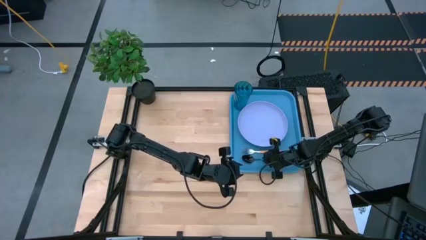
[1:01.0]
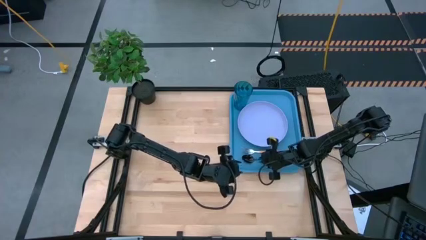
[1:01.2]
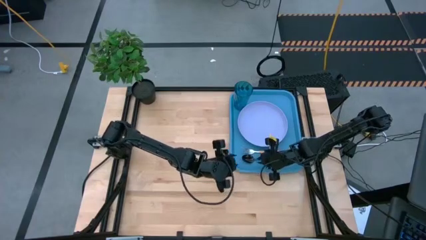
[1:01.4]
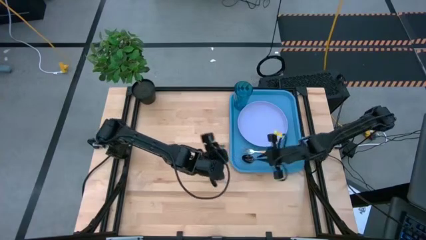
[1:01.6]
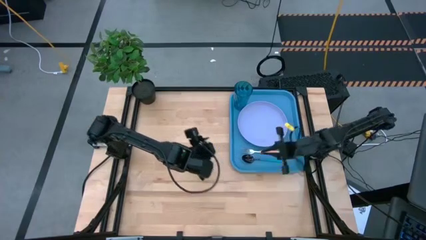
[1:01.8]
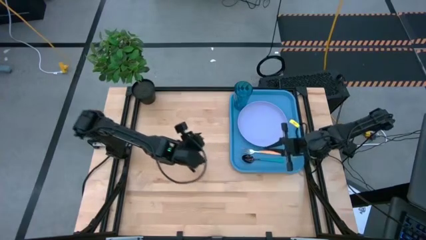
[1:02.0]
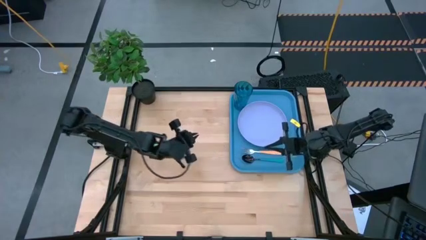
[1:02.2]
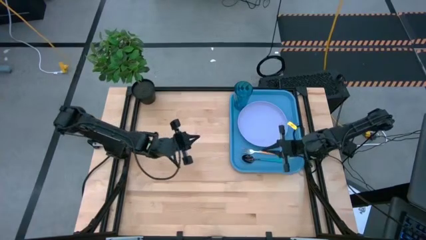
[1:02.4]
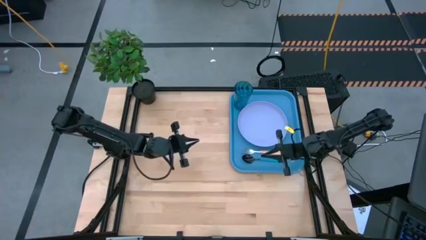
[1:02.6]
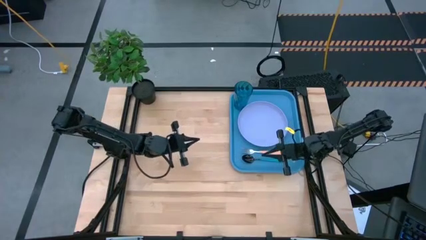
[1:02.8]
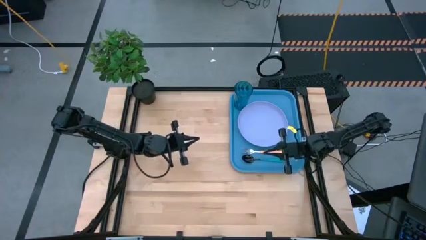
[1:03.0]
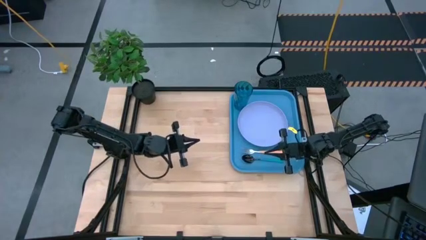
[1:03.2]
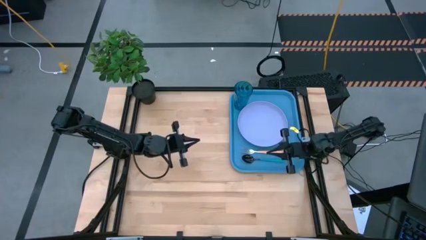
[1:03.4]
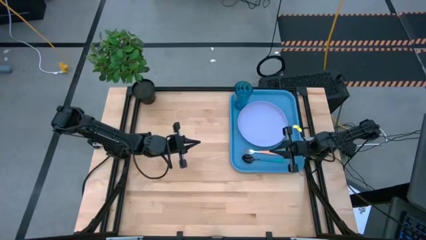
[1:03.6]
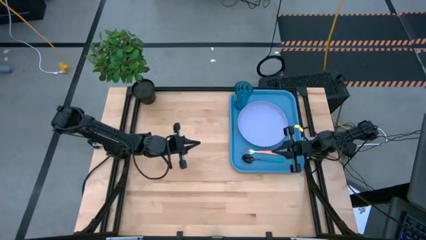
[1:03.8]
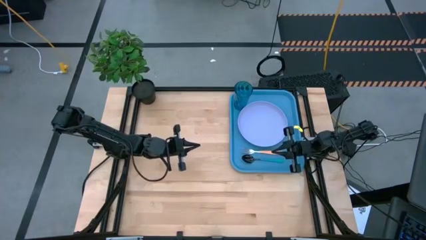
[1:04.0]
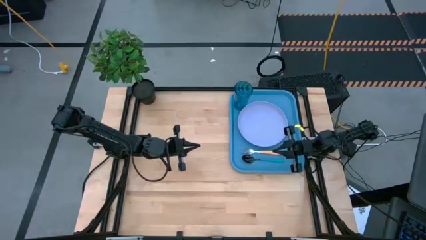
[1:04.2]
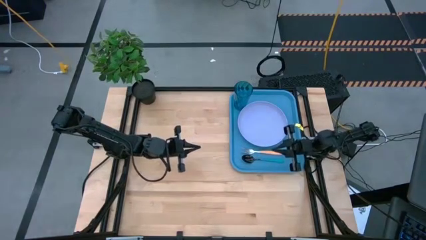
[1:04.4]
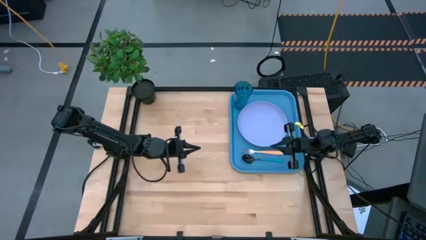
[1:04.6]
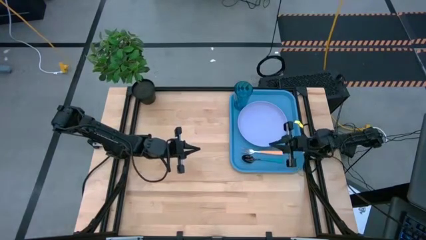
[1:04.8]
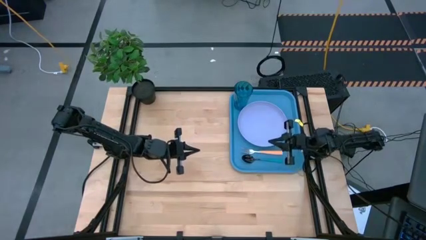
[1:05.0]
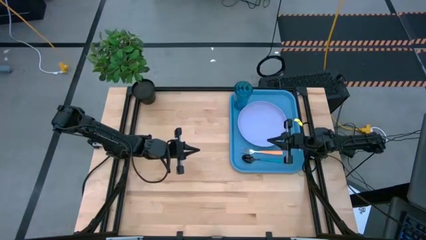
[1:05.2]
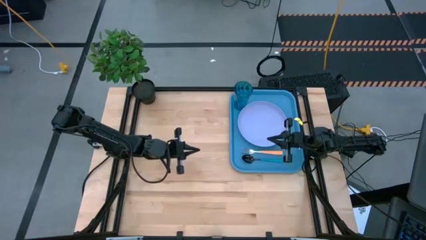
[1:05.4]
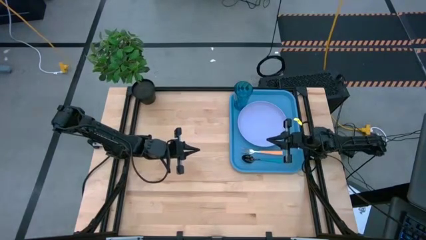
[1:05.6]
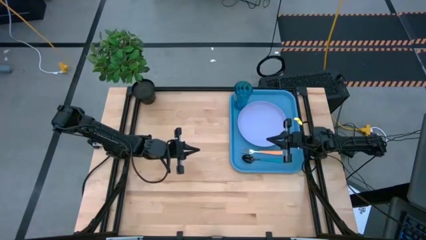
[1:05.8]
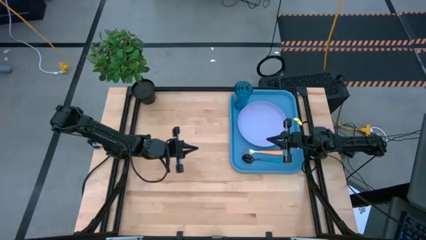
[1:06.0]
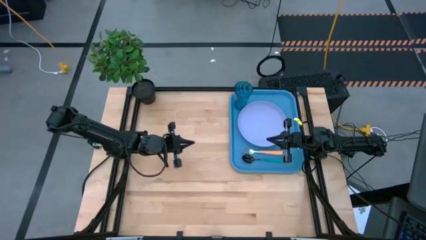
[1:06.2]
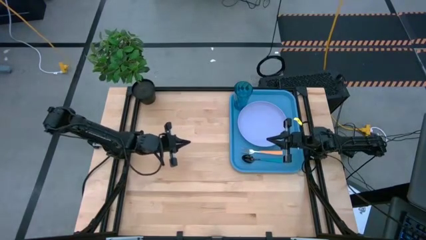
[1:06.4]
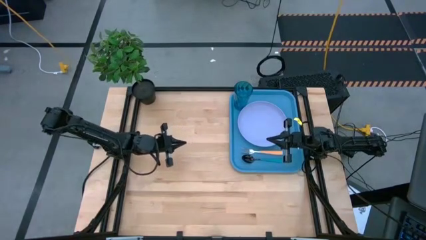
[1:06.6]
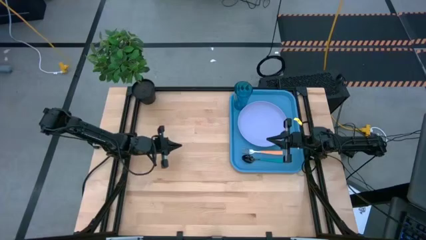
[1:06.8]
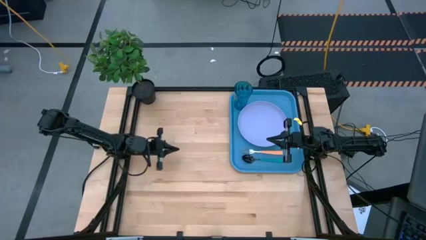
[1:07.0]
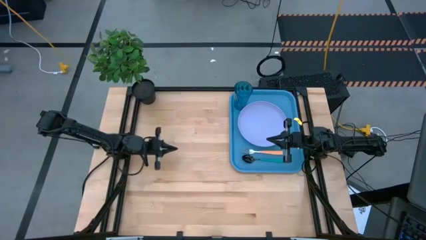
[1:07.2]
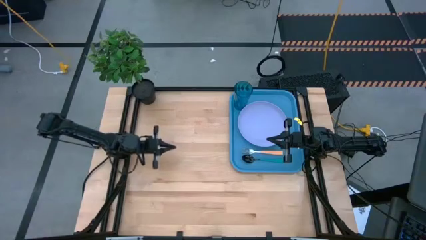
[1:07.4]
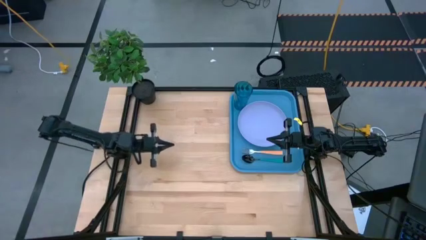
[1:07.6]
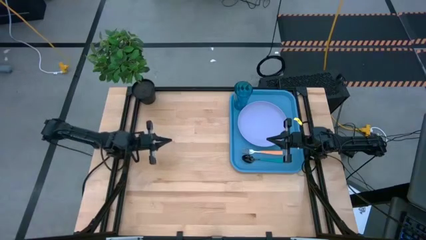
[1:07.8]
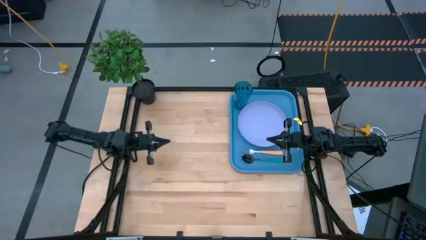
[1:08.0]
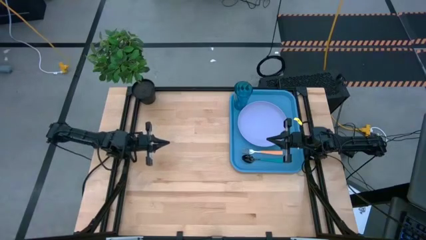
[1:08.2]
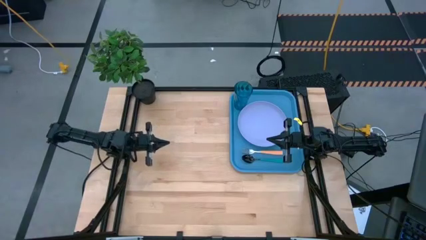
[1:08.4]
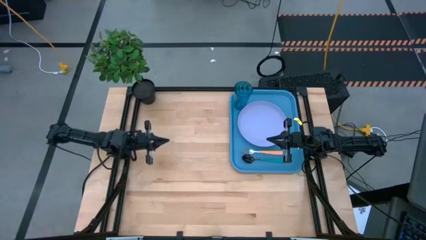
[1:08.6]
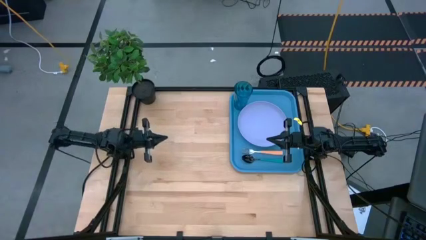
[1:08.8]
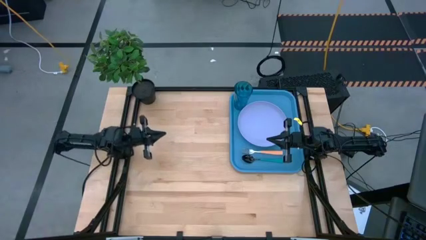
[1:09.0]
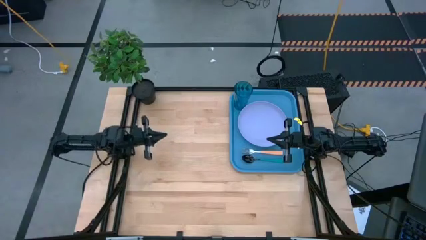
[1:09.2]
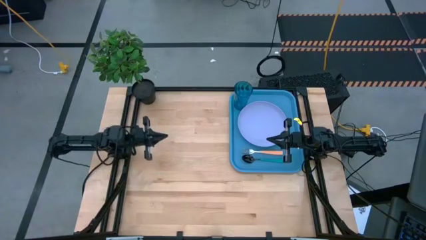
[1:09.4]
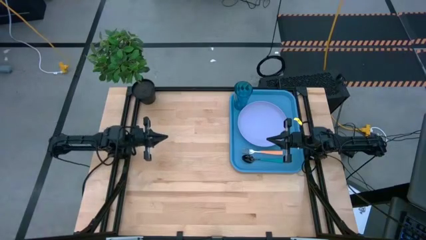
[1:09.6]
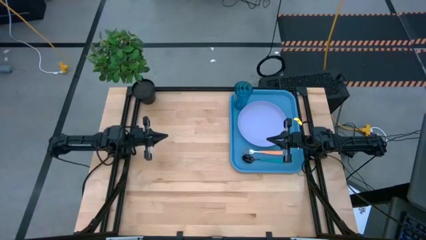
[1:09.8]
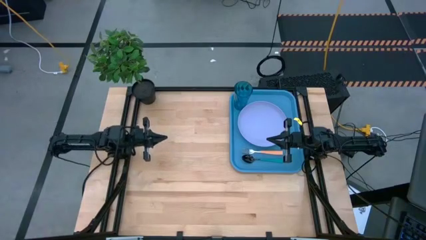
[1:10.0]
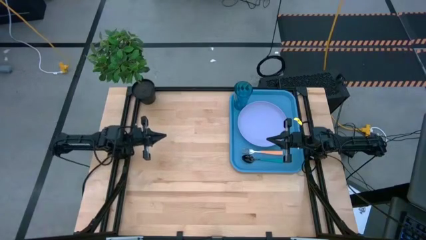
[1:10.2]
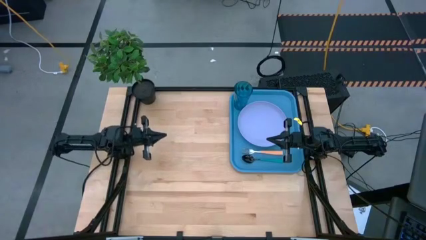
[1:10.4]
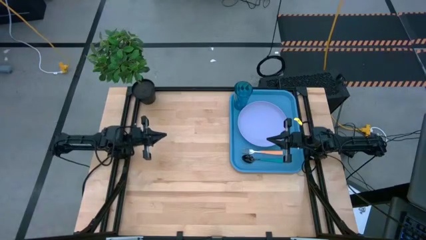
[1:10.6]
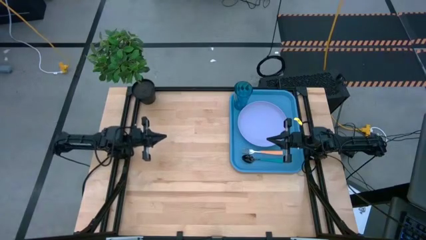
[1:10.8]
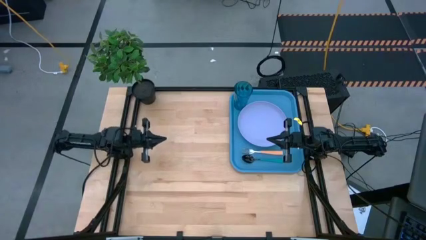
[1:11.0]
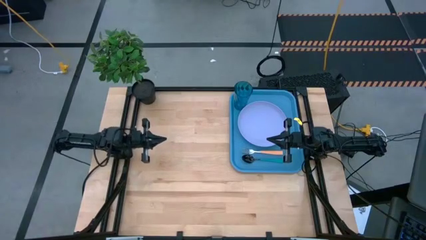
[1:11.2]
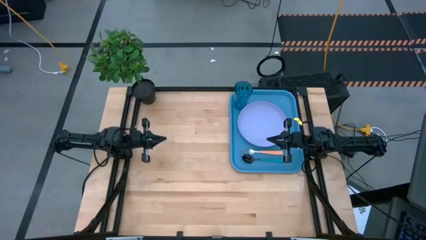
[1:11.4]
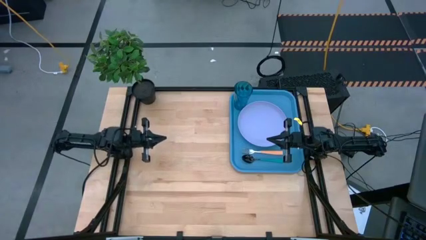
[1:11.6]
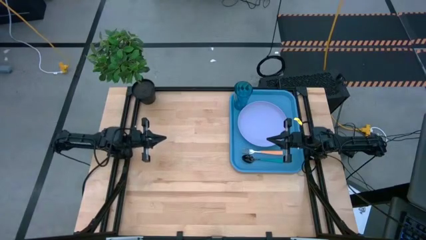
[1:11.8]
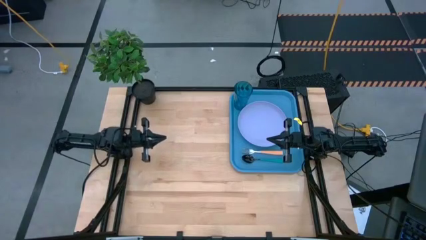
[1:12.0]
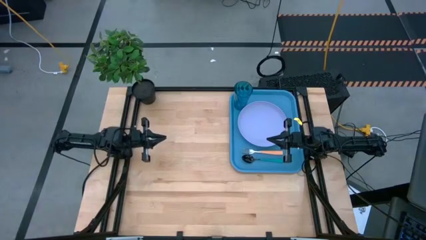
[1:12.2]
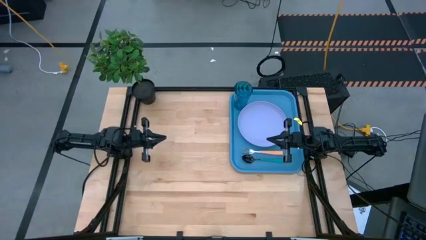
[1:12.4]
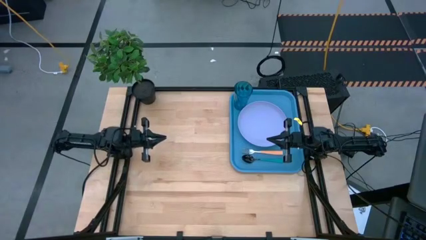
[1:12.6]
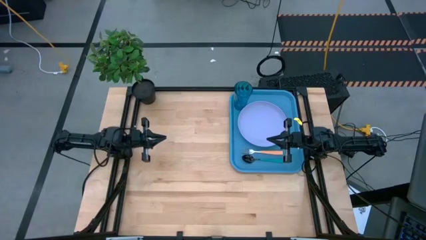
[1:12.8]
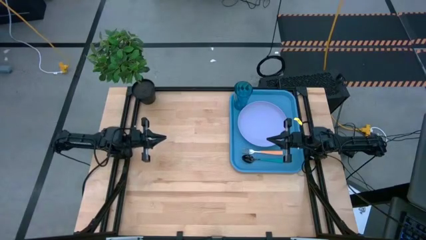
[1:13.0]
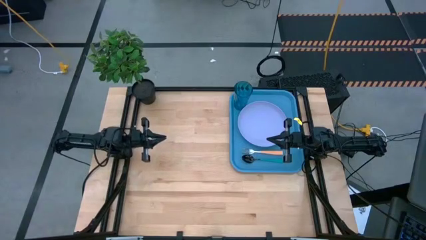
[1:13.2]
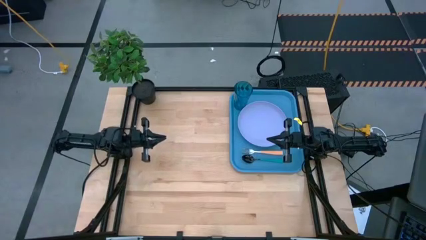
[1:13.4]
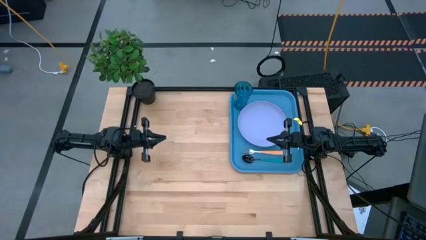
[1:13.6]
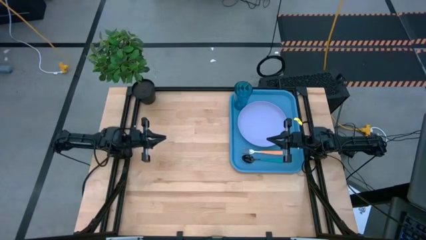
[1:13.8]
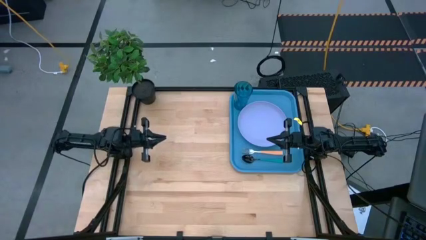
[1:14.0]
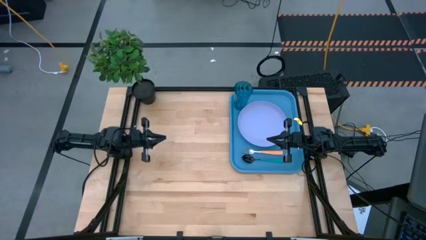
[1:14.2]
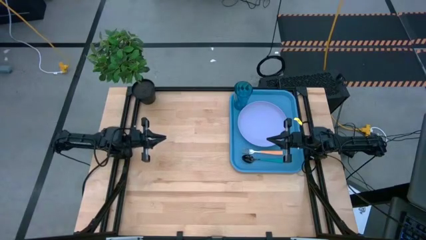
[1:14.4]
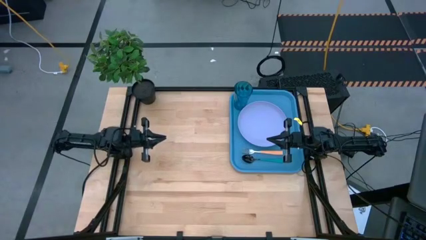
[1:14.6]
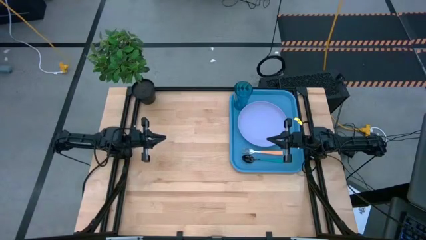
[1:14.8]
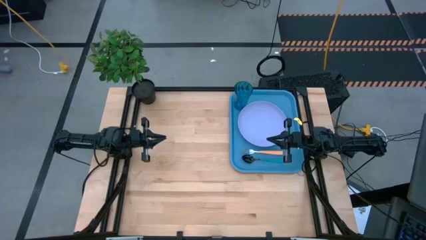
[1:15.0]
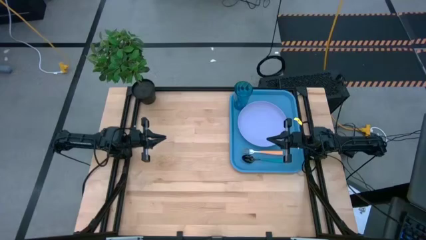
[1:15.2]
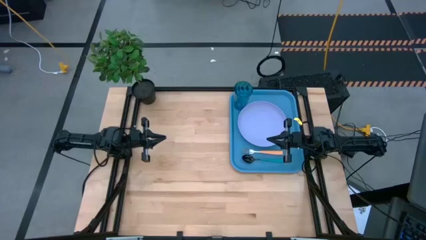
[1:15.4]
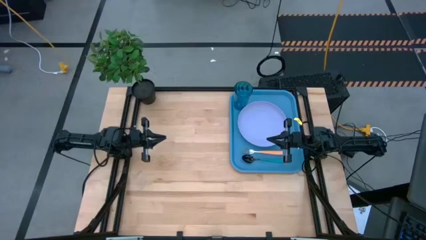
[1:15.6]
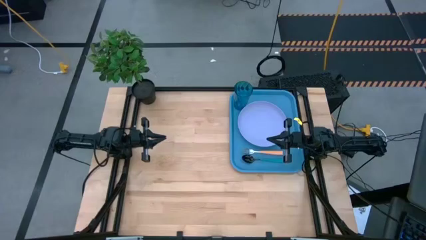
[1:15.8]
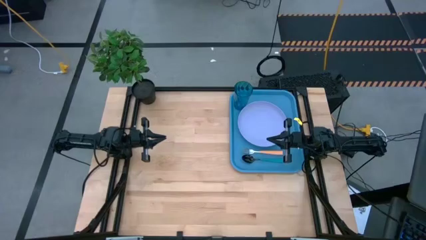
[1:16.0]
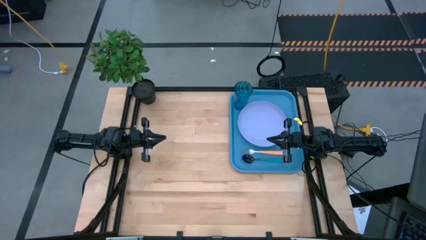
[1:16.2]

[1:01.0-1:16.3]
Task: Pick and place plate/cup/fork/spoon on tray
Return to Home Position
